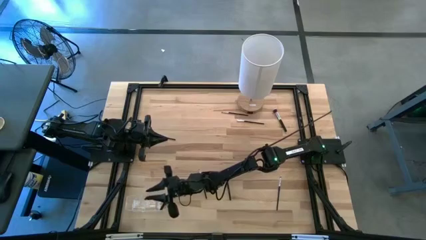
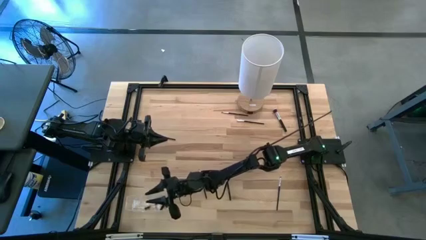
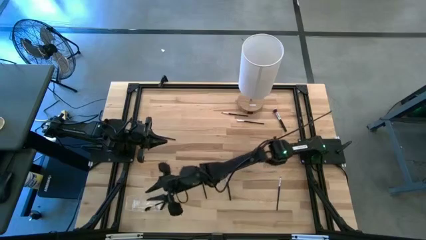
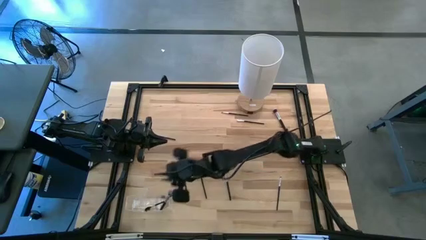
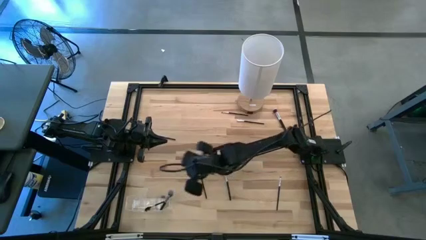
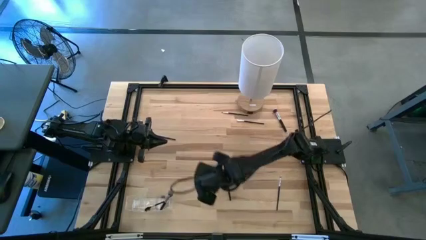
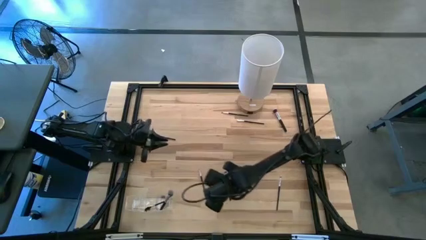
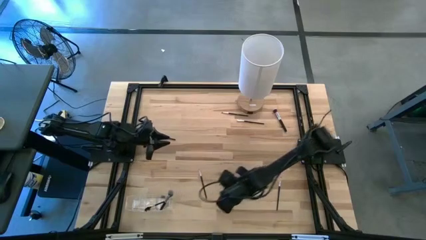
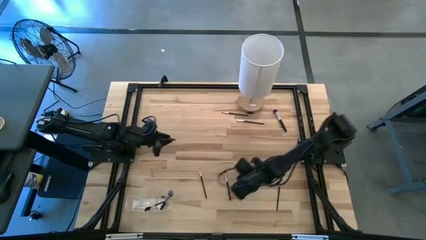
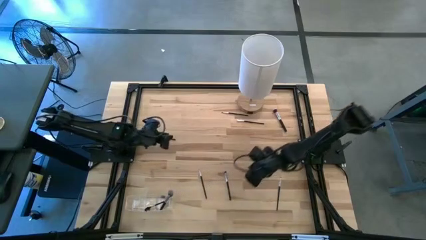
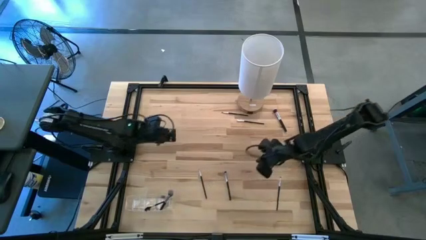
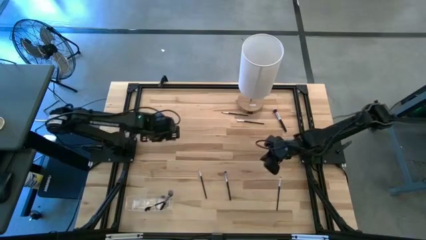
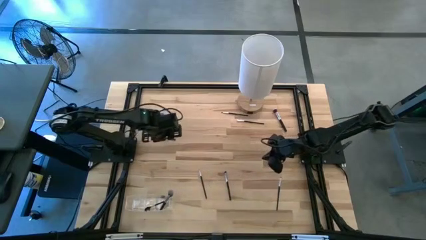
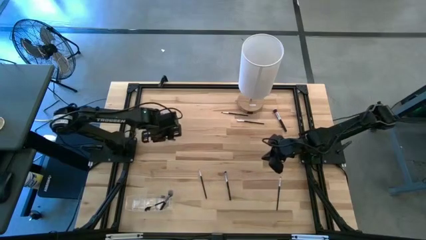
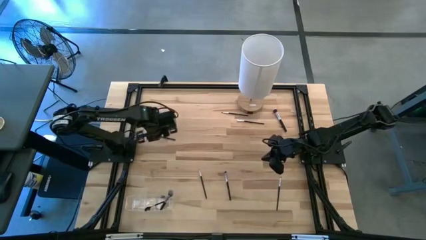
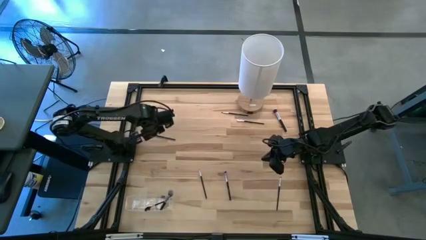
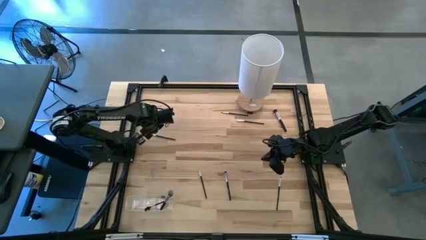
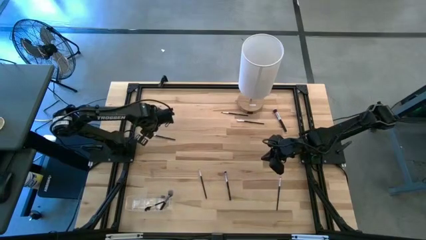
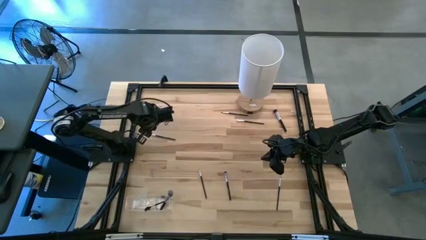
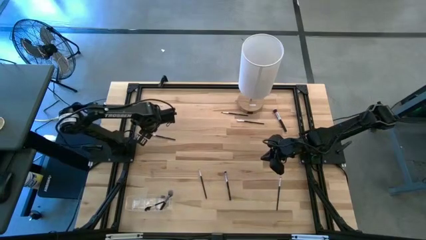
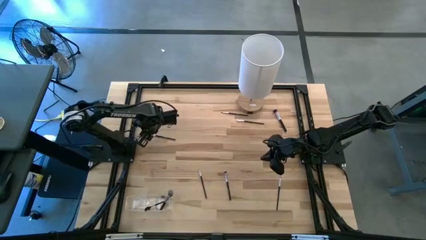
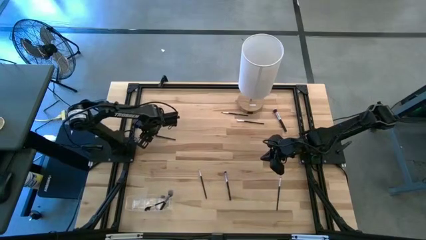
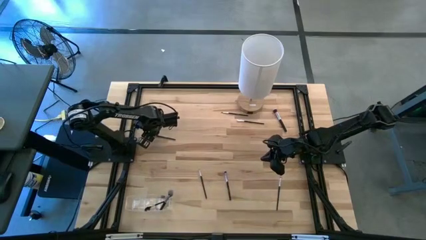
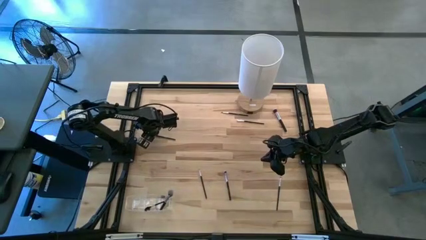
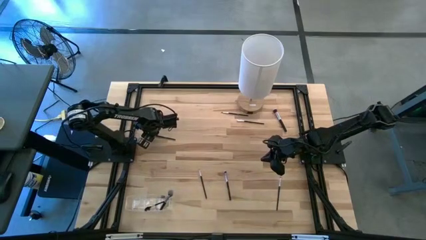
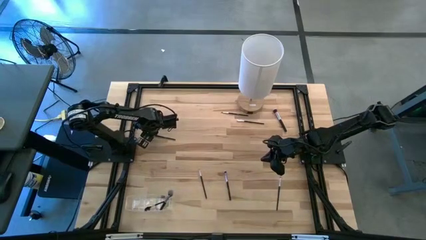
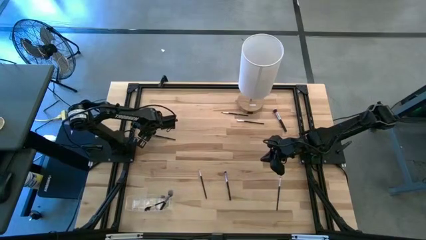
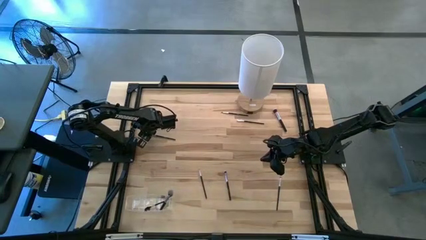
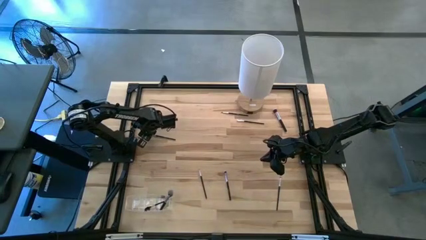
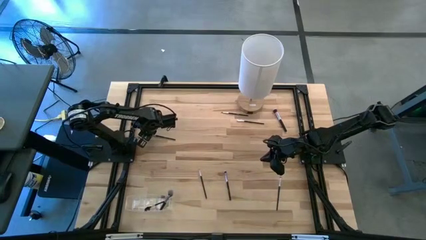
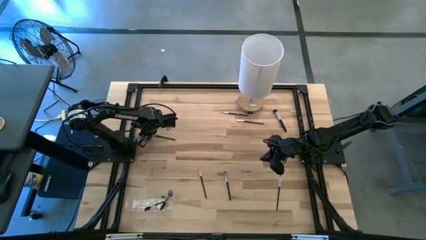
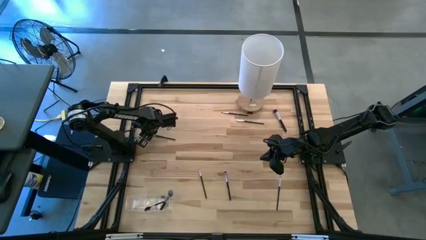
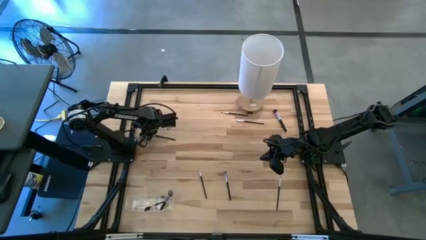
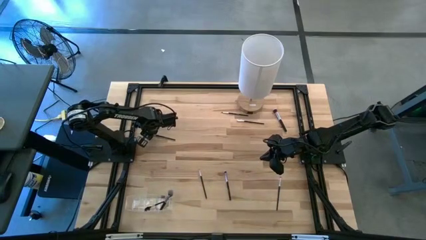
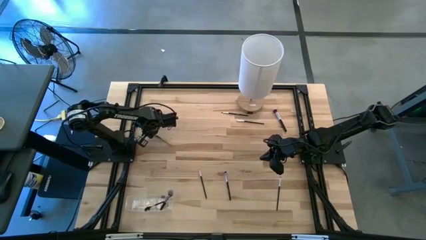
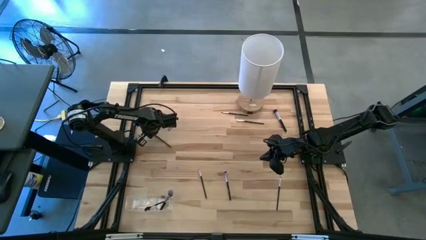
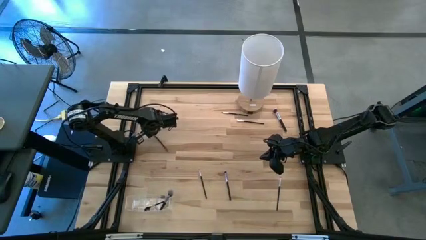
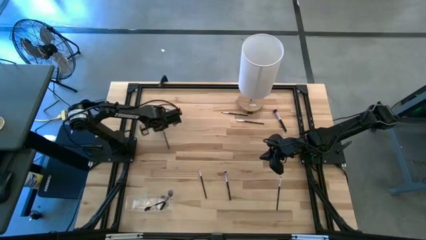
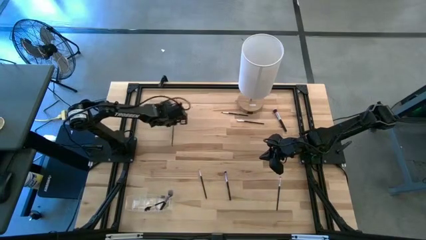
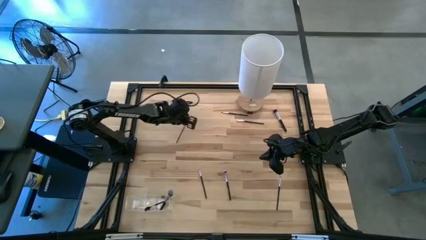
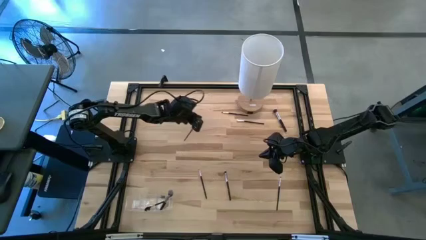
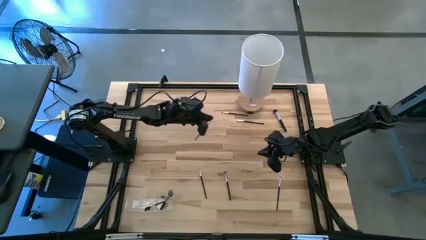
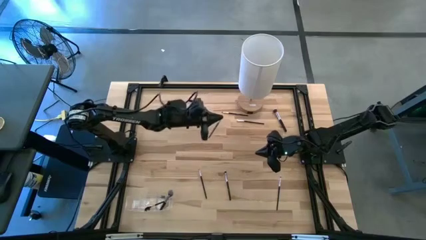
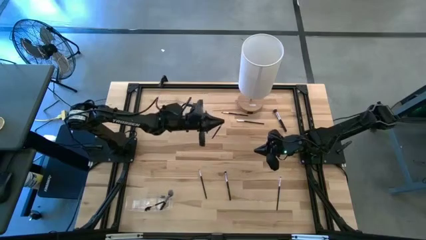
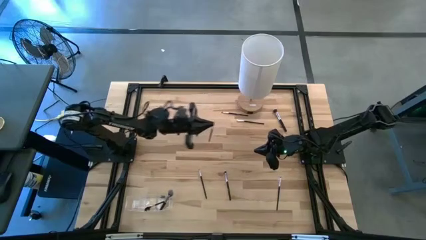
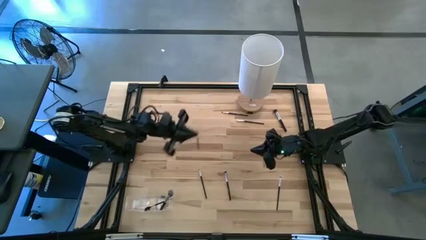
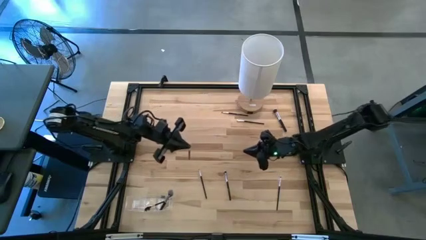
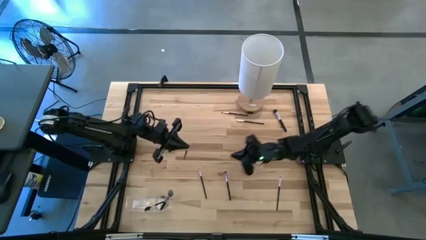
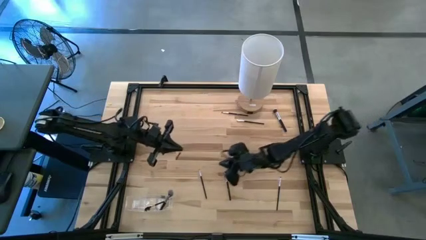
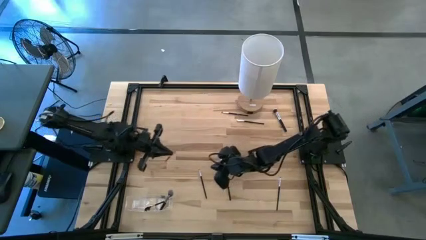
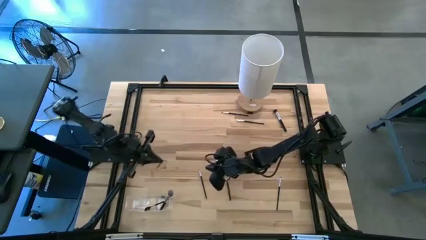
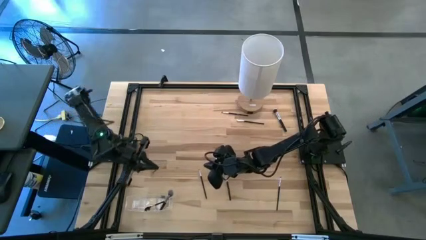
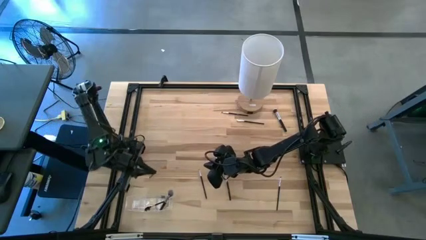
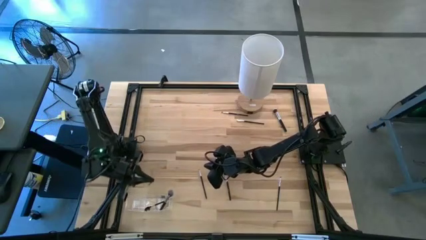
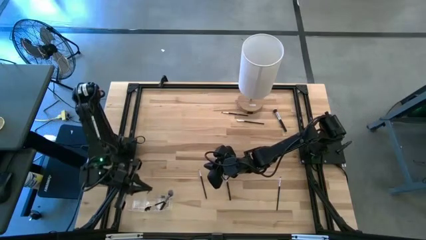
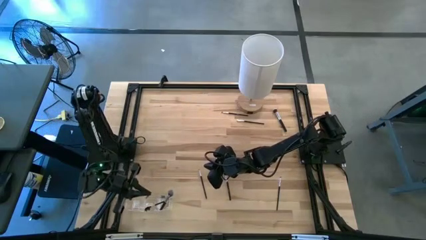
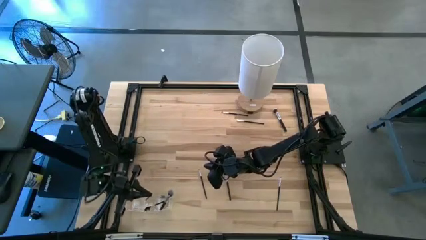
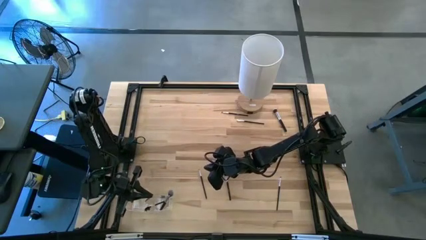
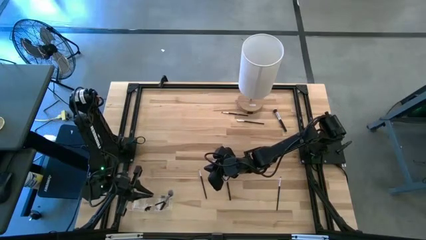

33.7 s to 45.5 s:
Task: Put items in baskets/containers
Put the eyeshadow brush into the transparent organizer

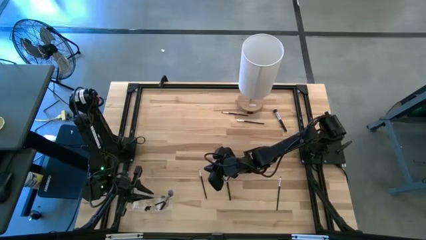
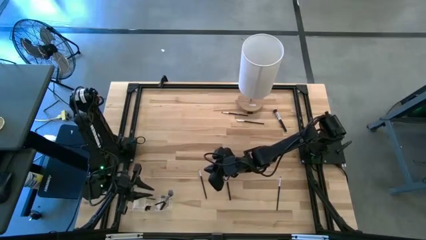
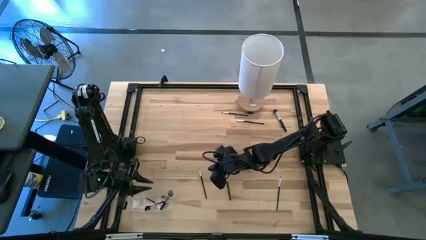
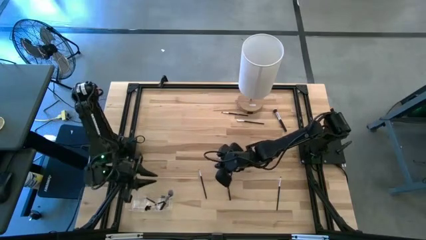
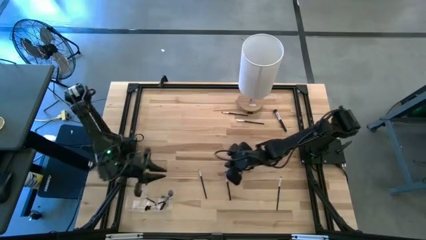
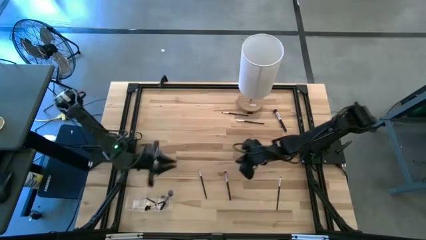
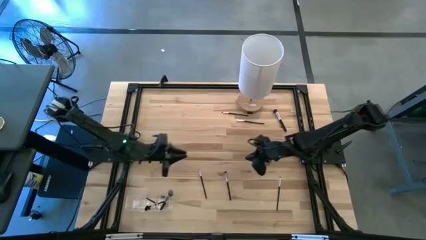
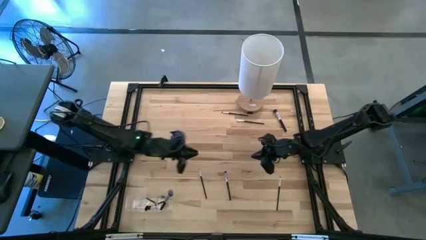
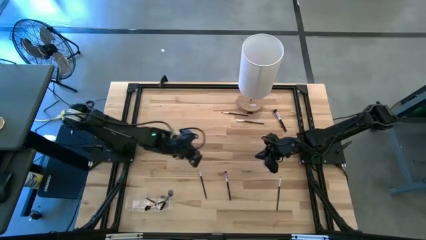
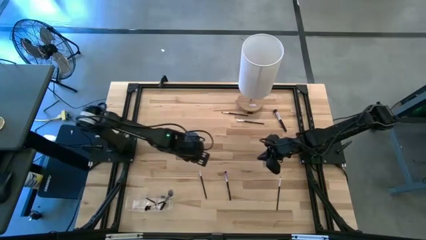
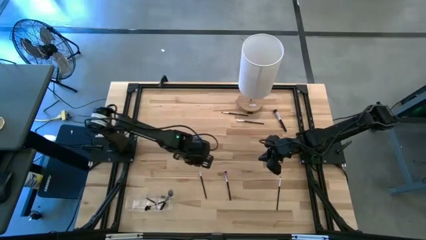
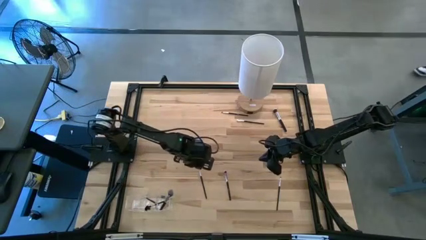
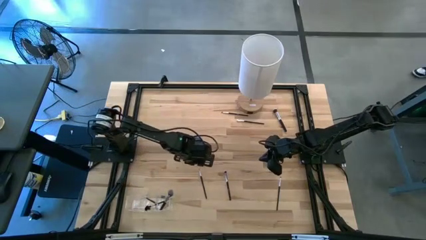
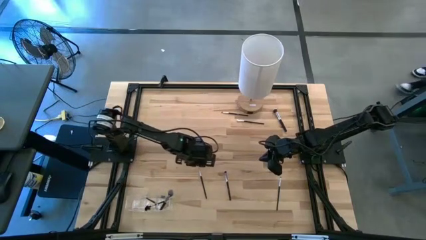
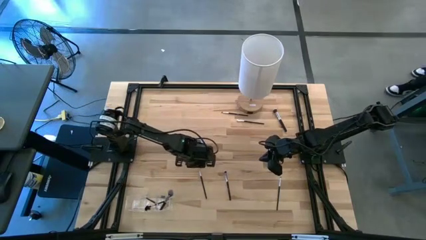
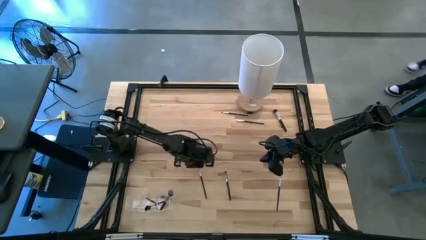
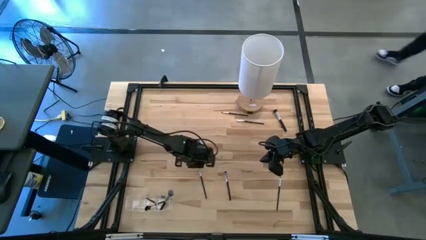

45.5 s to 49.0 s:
Put the eyeshadow brush into the transparent organizer

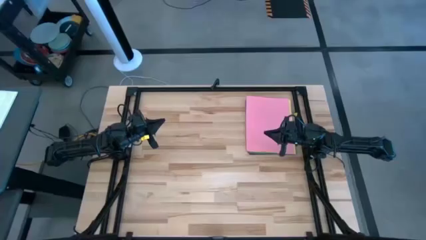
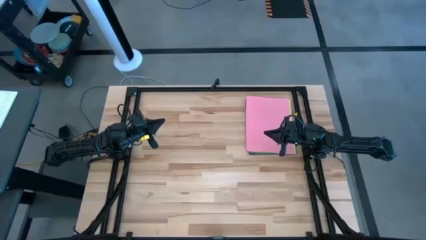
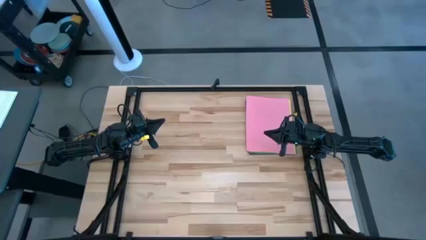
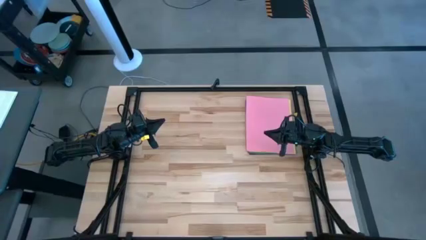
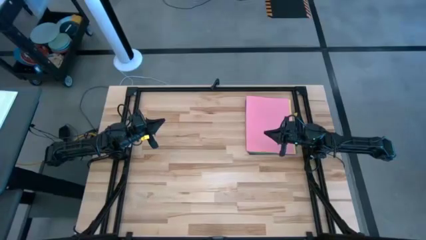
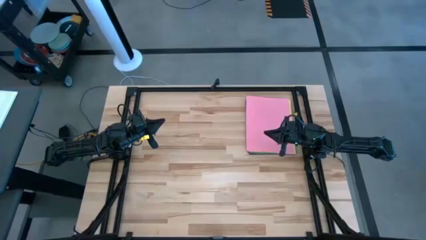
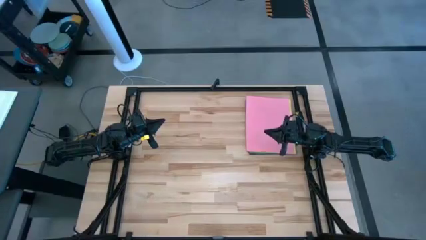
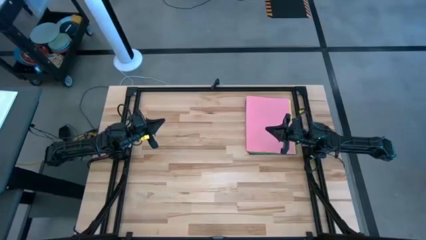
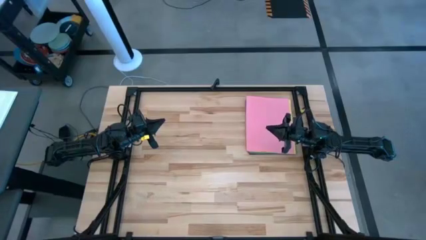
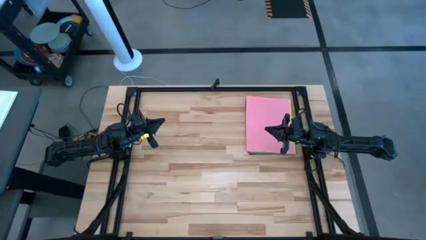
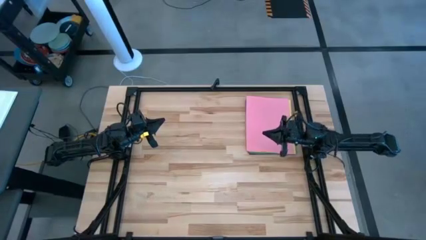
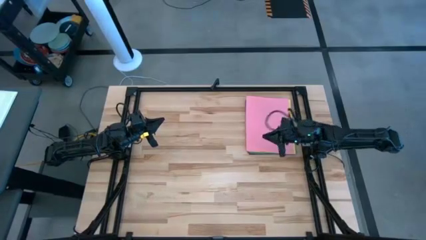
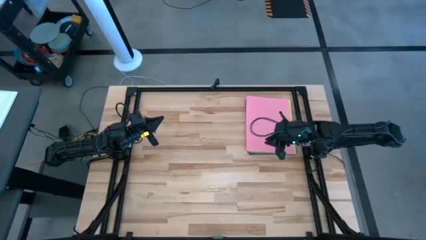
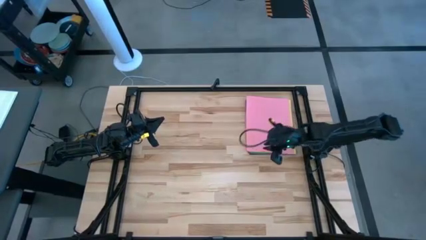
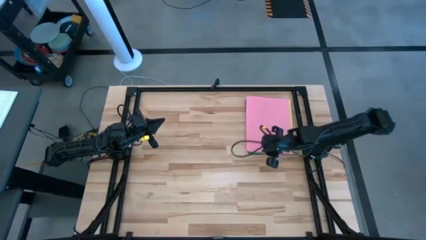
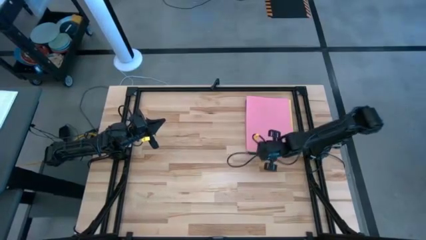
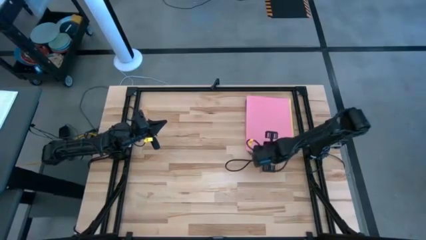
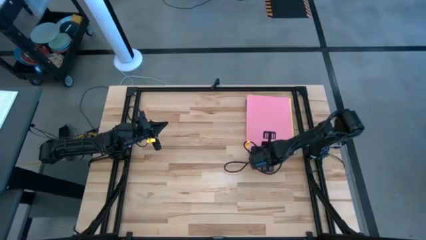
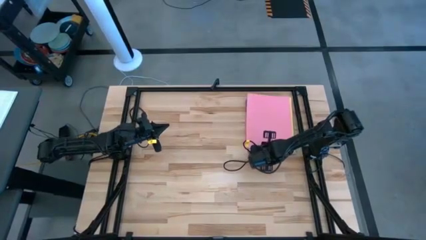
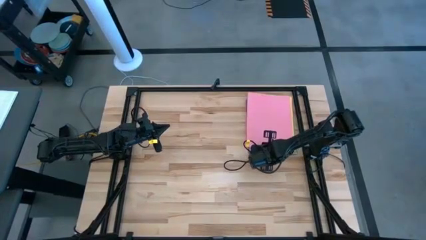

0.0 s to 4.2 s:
Task: Organize paper
Move the pink paper to the bottom right of the table
